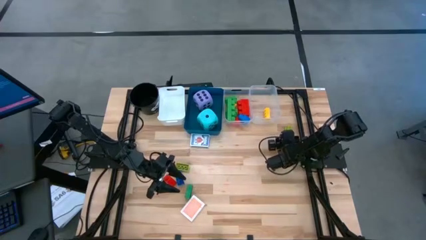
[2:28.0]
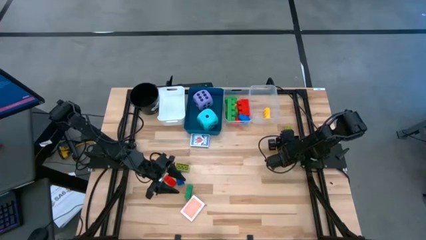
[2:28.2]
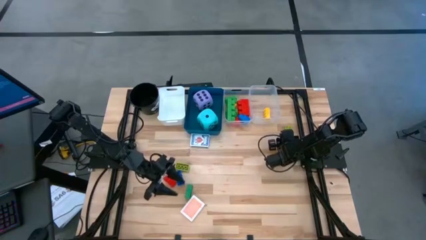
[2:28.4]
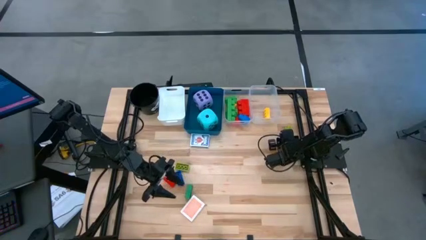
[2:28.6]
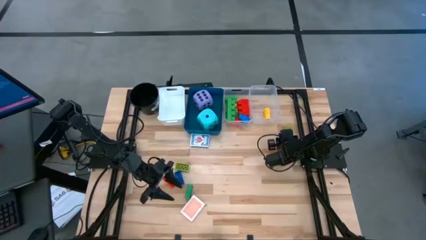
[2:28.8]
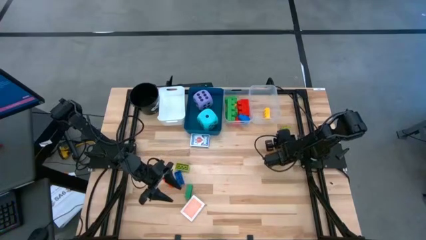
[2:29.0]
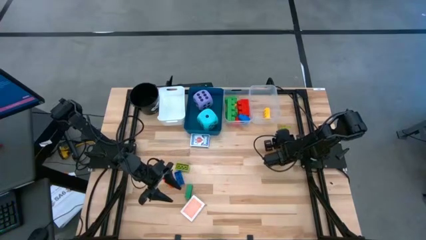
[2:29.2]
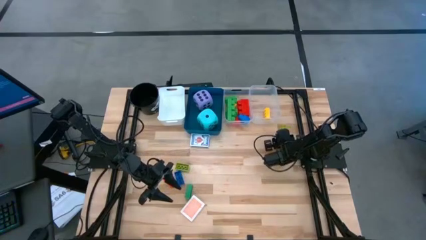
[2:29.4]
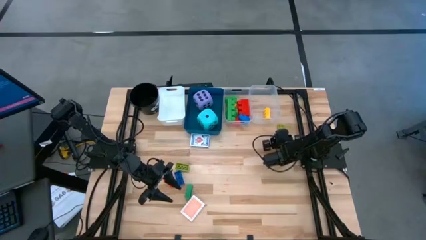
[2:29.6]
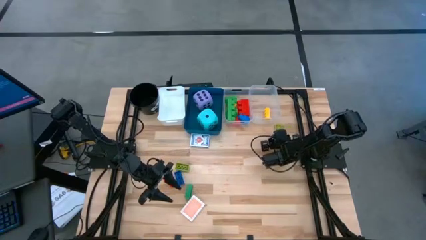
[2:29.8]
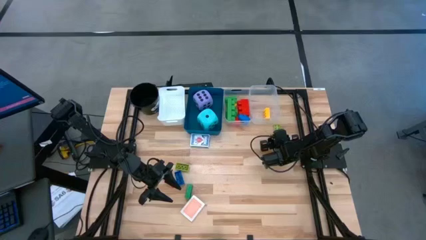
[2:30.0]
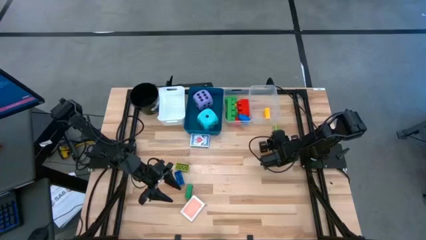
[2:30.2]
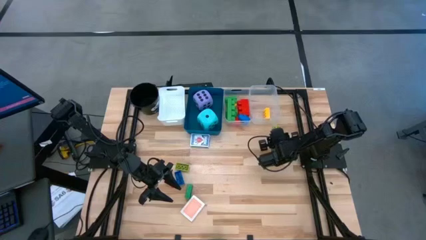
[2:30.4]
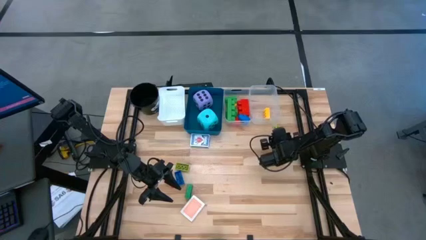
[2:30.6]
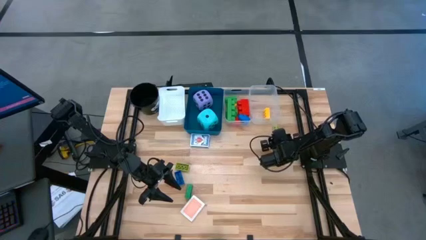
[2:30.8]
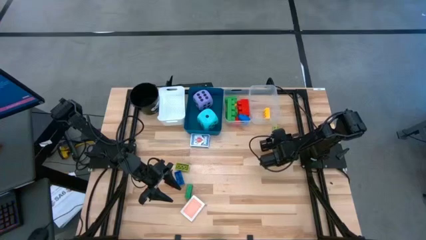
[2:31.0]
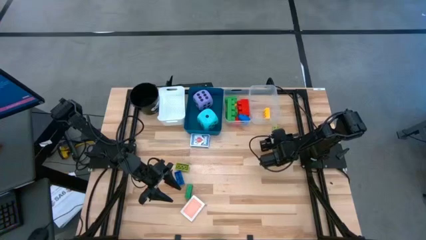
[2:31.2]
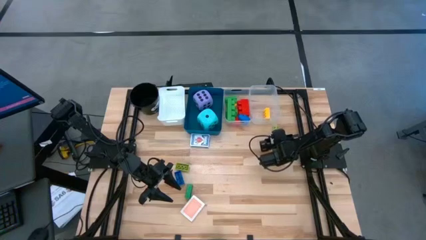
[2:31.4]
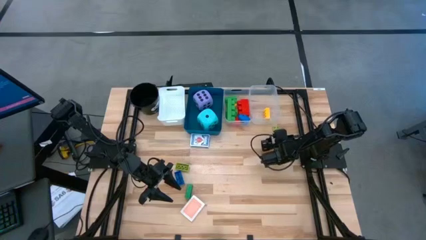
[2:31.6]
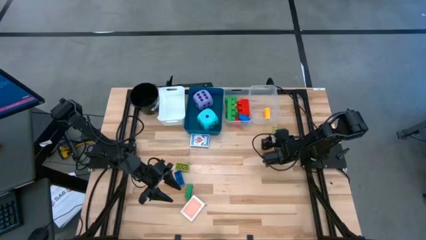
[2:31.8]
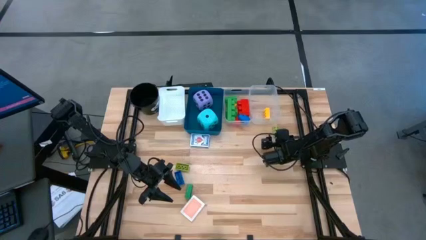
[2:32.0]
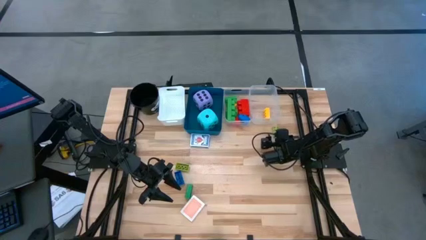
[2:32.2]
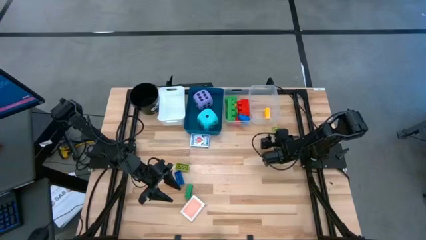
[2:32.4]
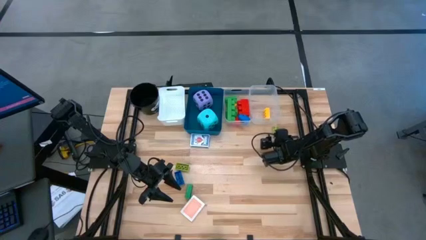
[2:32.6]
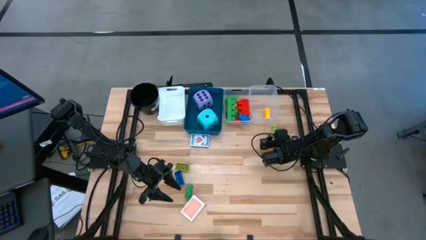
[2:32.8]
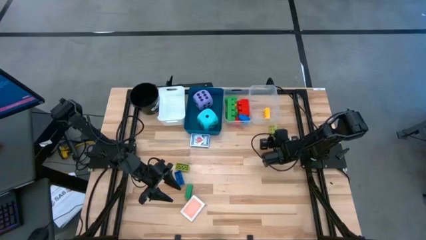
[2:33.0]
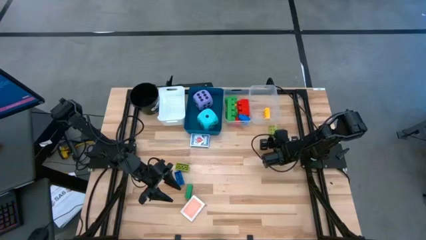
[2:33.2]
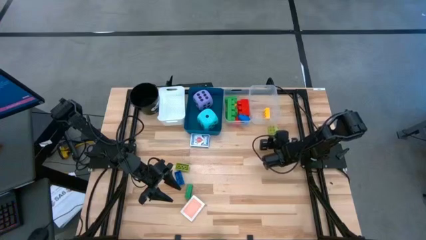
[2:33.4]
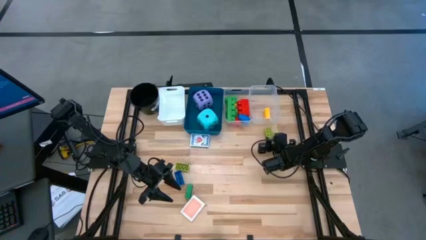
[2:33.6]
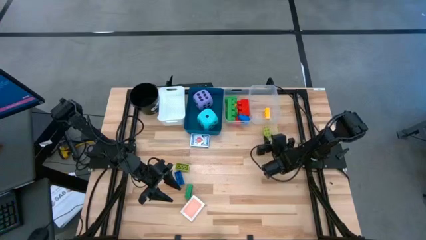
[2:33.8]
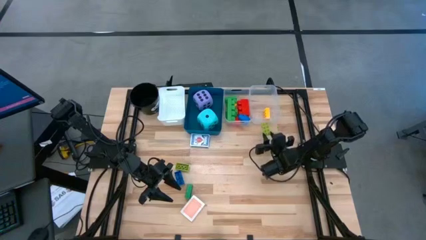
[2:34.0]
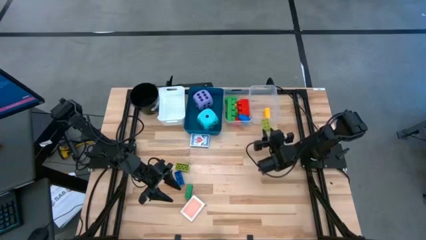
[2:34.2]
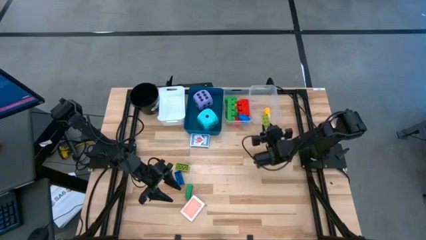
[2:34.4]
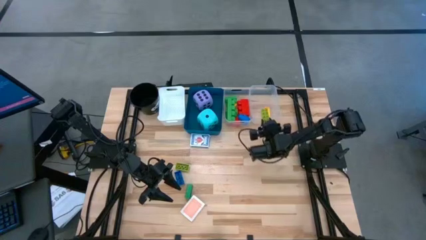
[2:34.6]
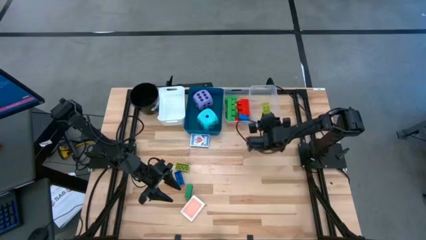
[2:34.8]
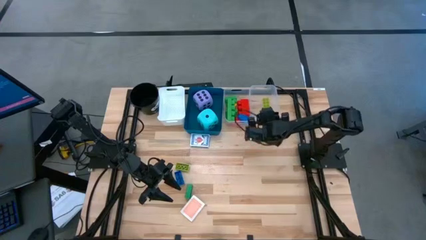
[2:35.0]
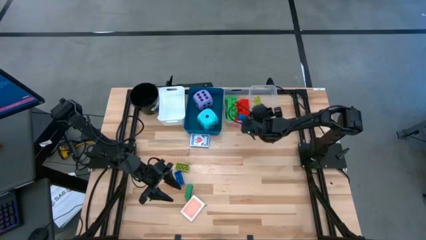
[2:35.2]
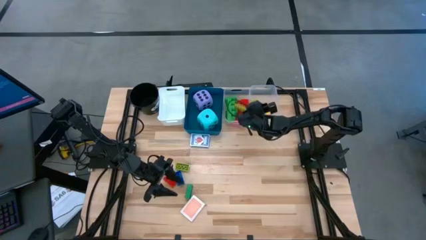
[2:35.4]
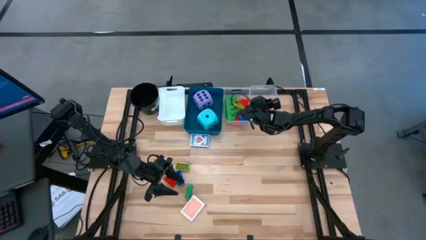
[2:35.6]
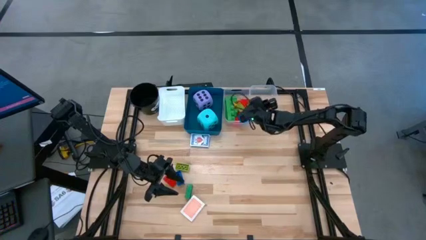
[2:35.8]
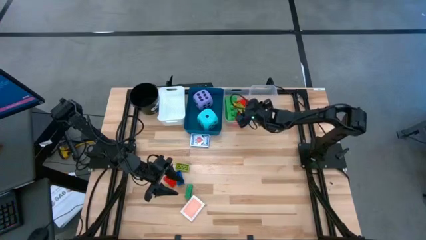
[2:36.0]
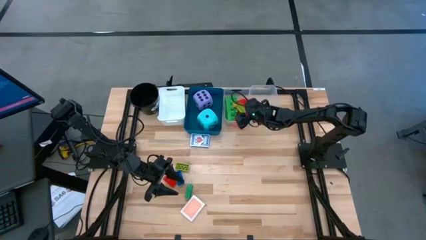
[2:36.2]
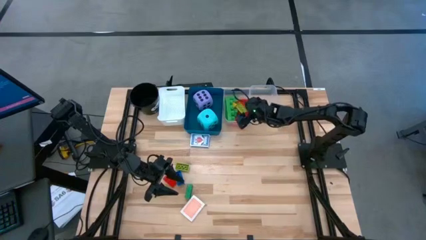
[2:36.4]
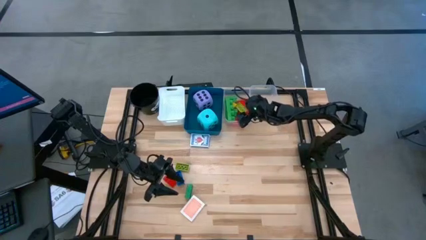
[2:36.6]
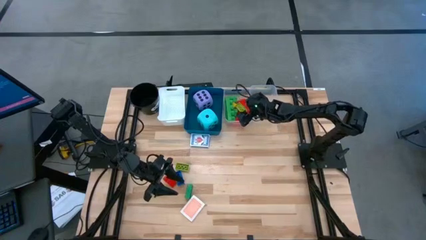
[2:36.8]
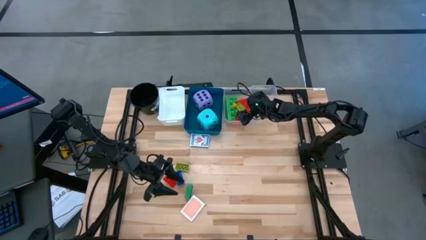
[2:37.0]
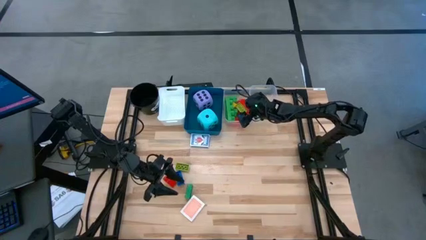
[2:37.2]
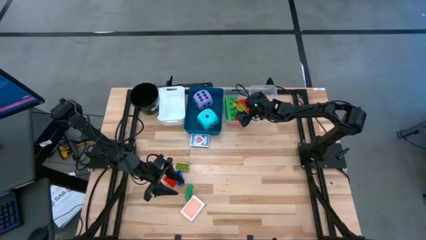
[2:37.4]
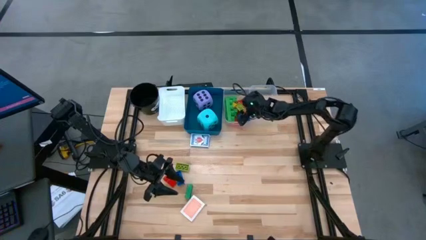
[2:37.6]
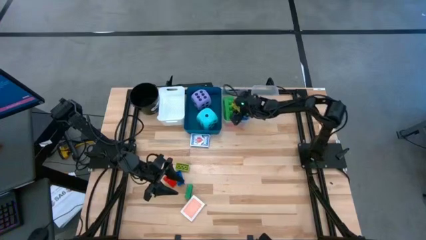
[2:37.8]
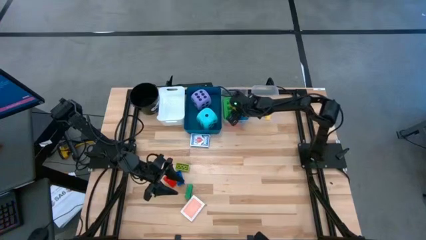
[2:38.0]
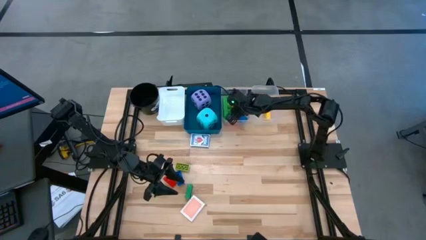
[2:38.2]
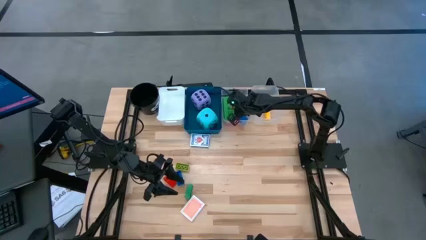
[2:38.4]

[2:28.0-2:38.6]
Task: Pick & Place Toys
Put the light green 8 stud game piece into the right transparent bin

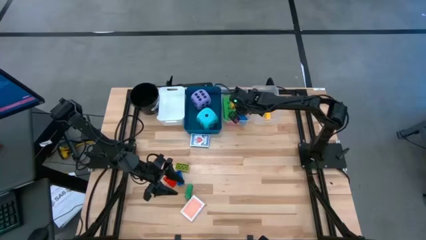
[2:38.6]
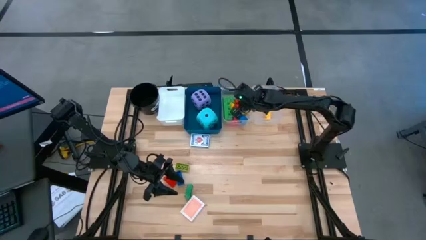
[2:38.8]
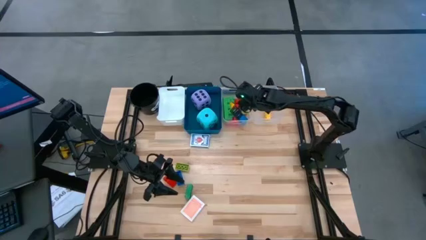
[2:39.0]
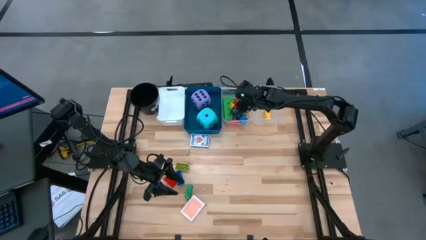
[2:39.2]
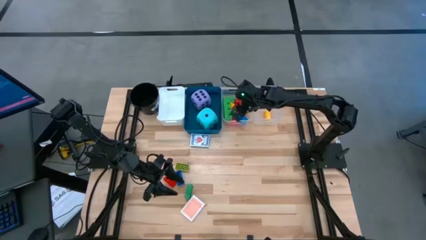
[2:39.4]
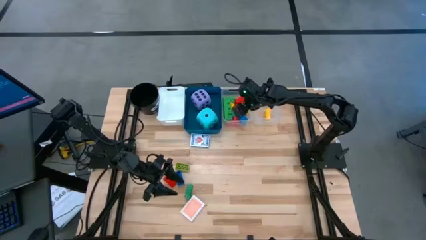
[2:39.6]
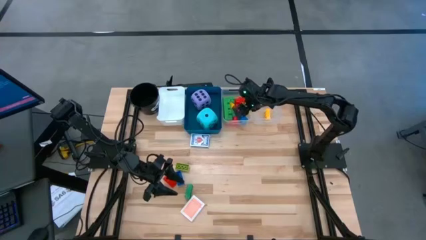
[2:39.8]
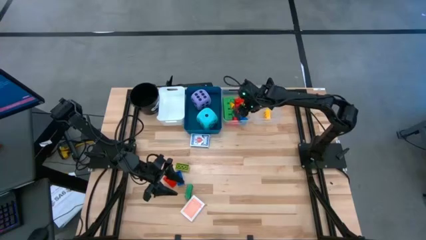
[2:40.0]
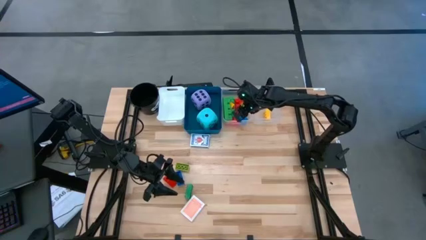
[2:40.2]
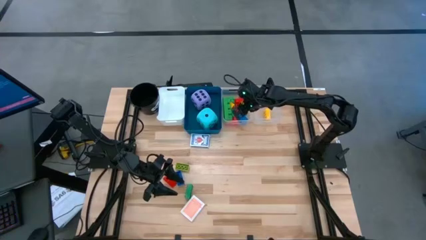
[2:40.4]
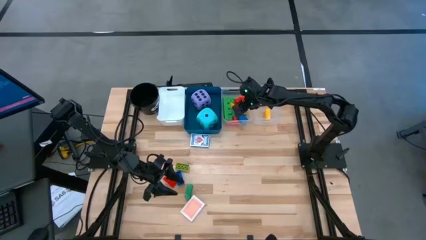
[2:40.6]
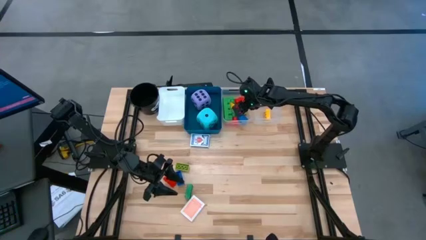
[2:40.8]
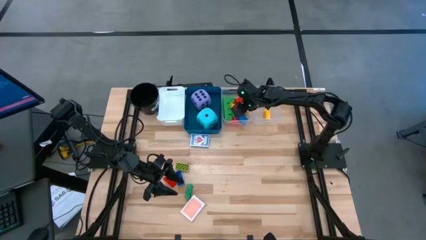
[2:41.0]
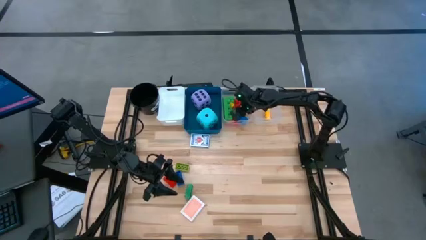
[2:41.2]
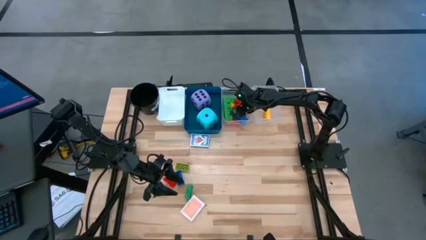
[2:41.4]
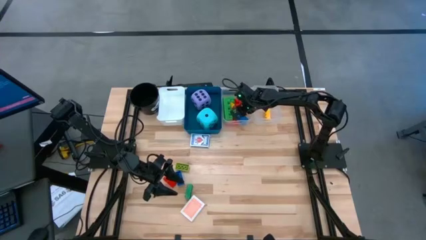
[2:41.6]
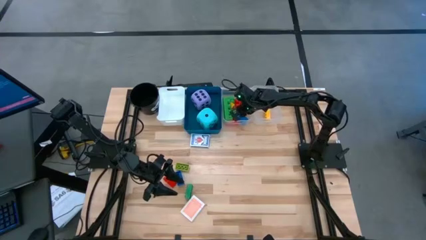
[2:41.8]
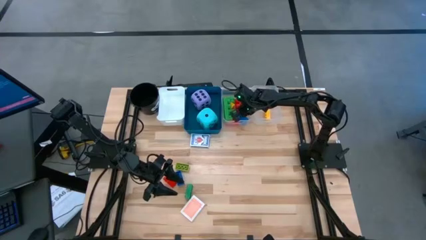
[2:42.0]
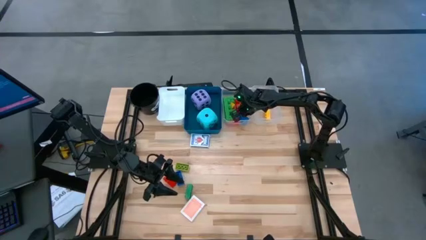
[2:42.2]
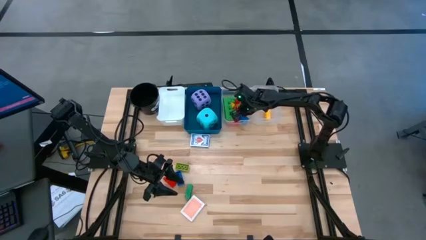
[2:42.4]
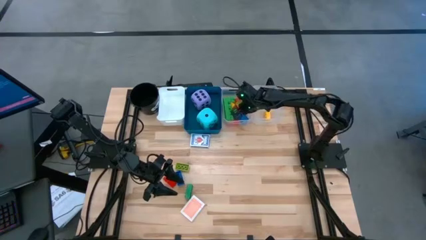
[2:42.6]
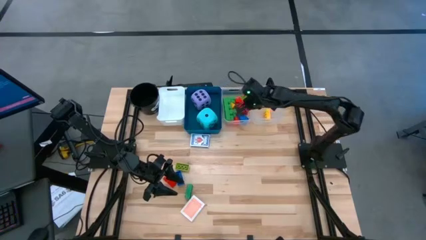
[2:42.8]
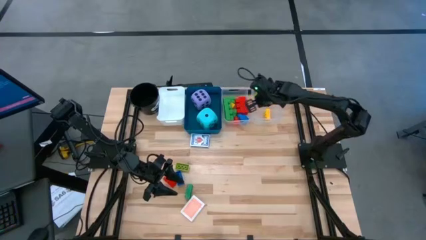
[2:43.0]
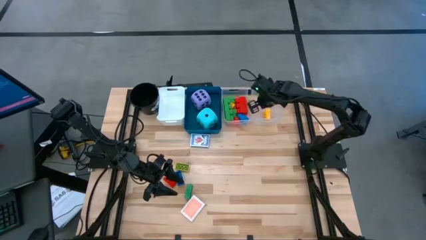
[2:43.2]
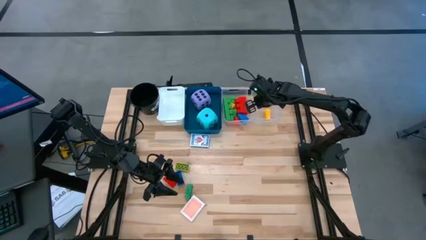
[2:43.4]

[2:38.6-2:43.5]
Put the light green 8 stud game piece into the right transparent bin
